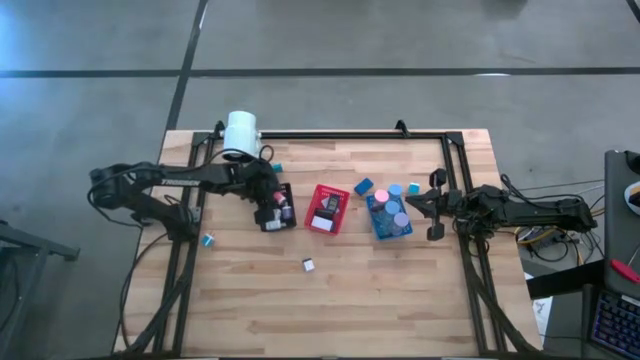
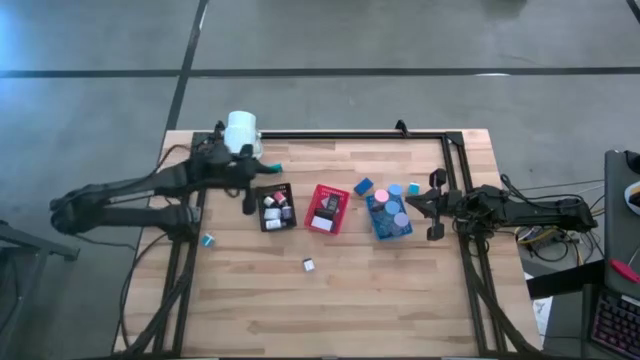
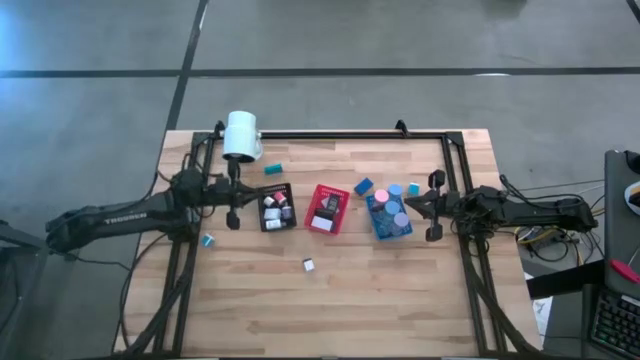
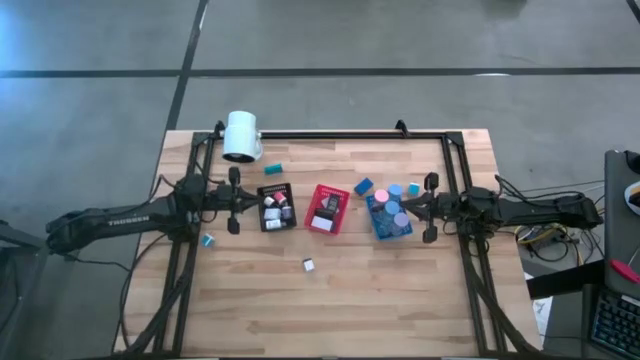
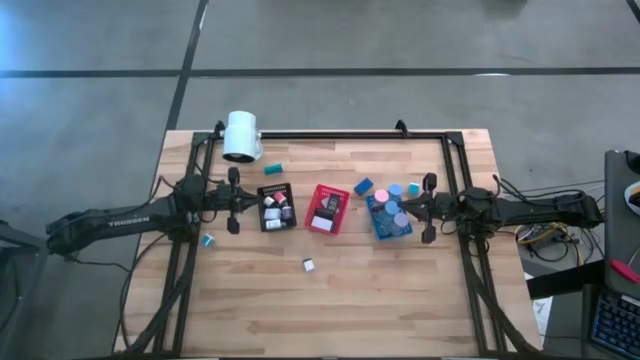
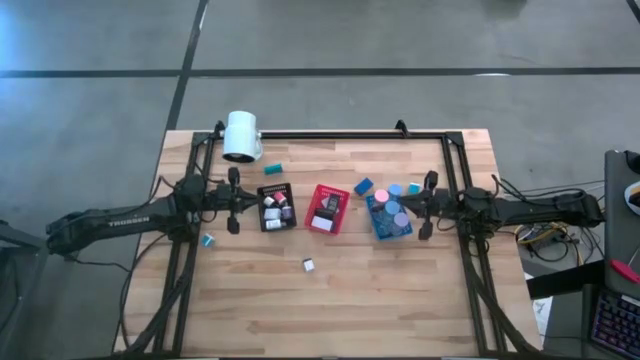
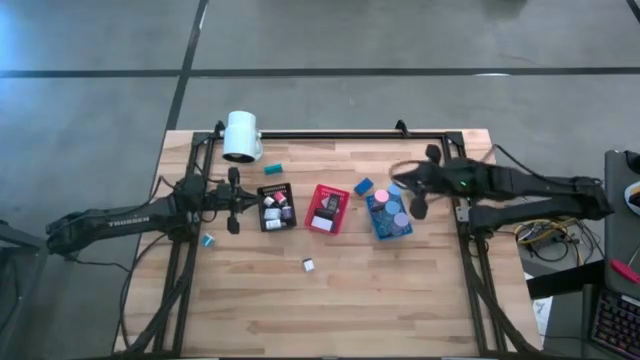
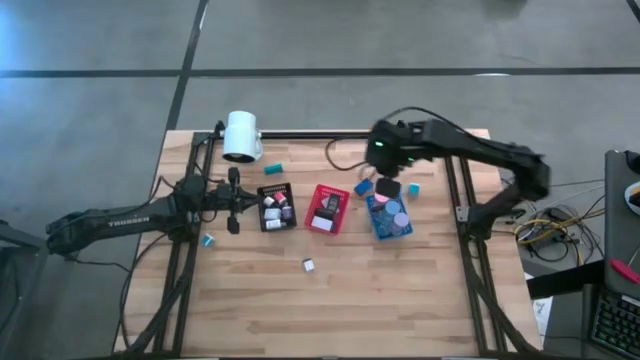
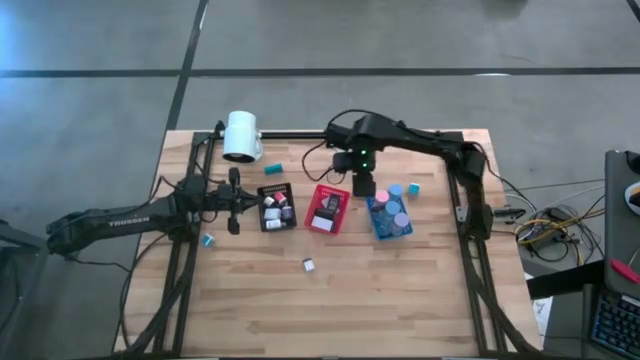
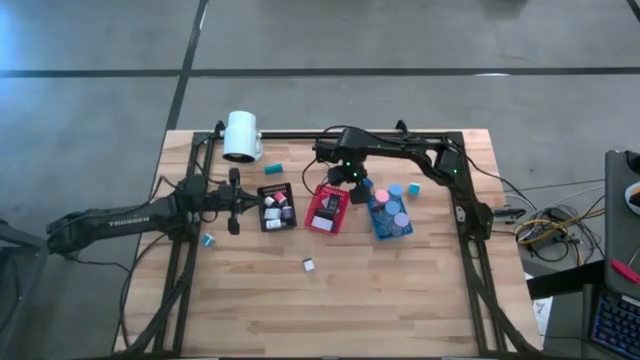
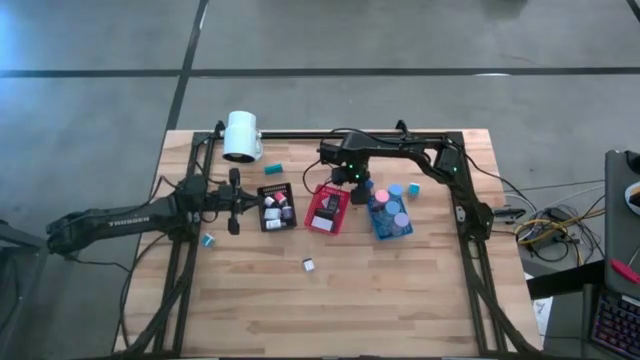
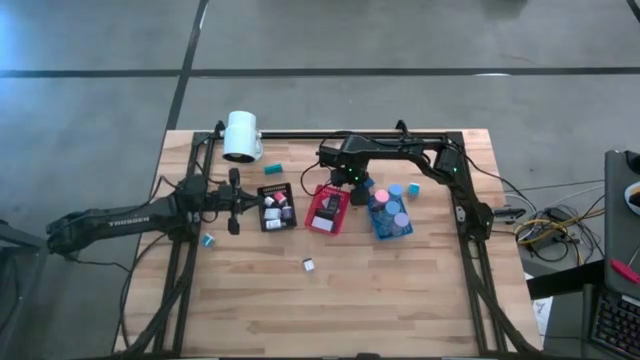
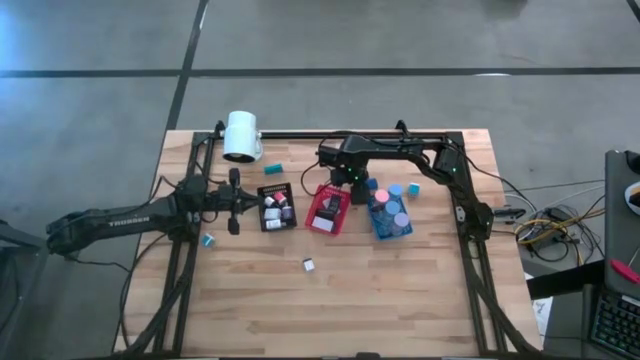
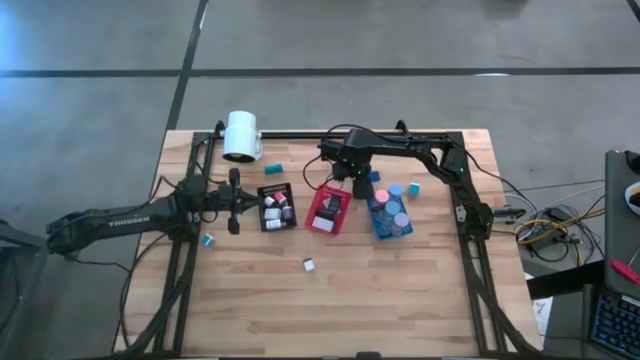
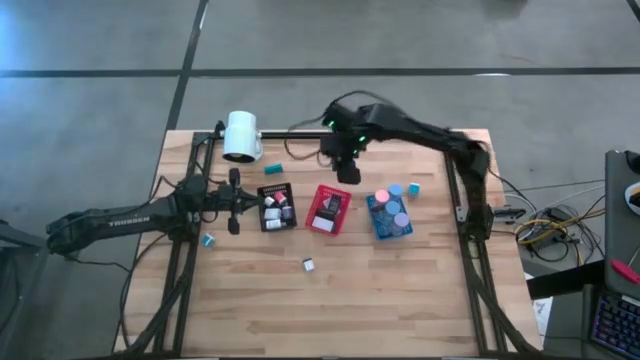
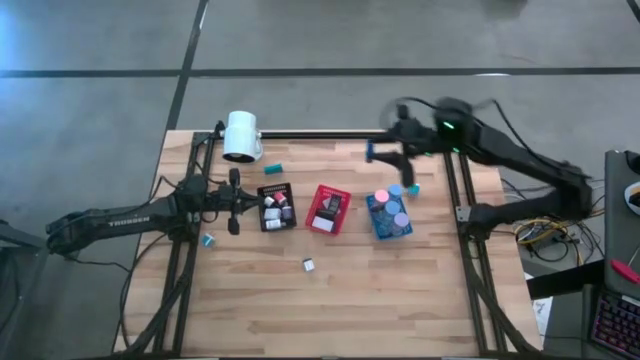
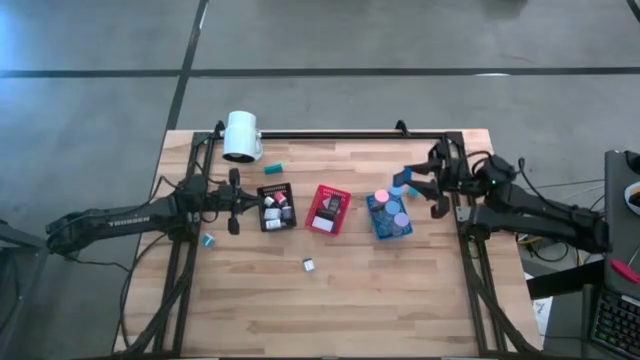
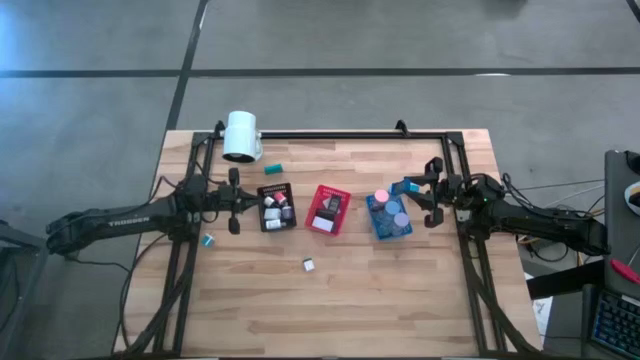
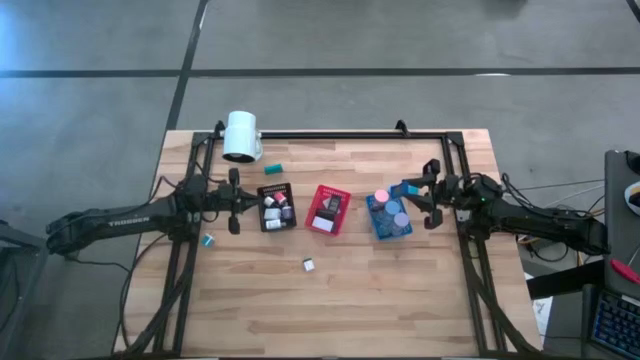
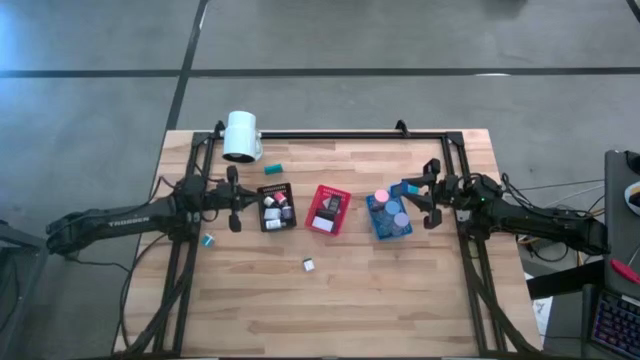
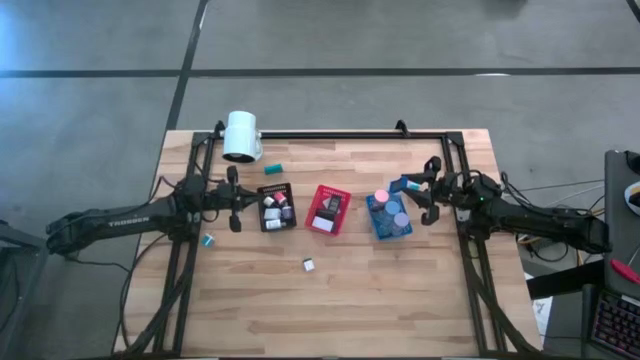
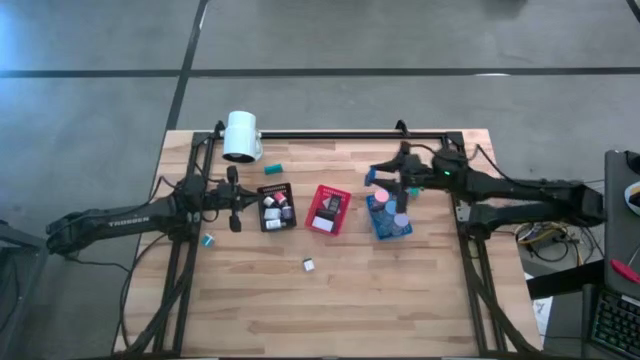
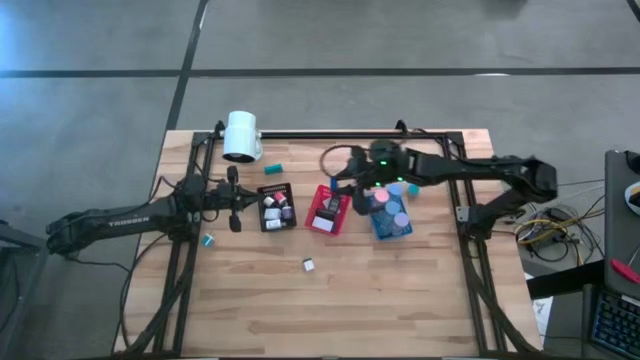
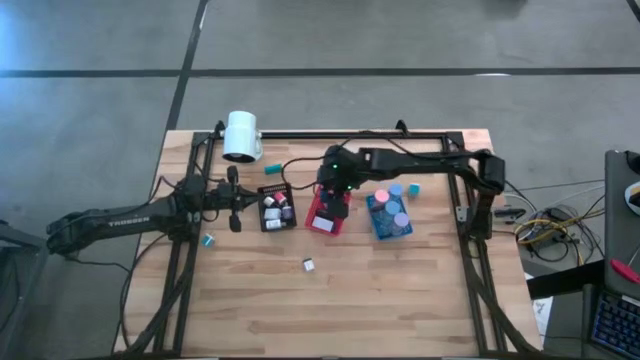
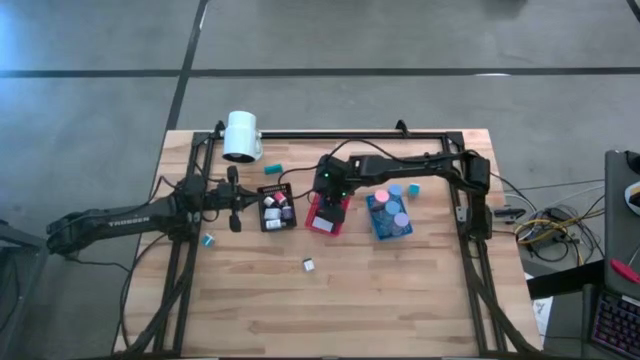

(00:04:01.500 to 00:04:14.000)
Task: Pick & Place Office items
Put the blue digital clock into the red bin

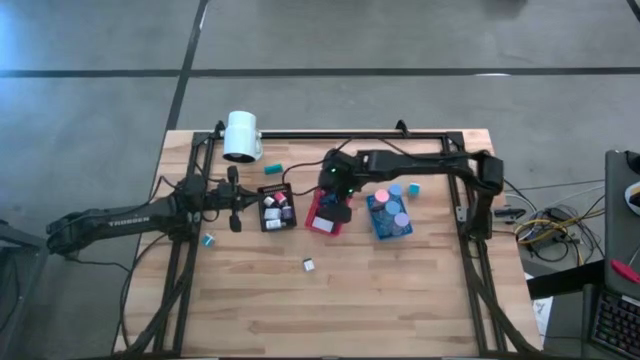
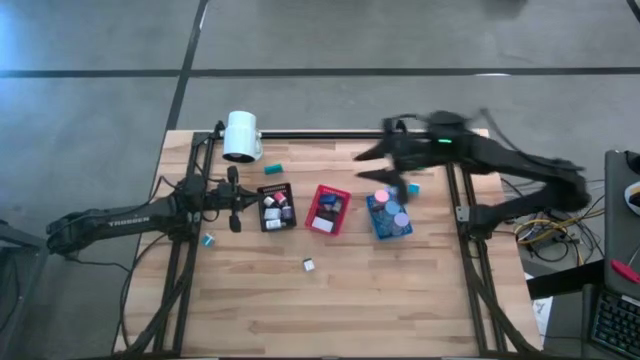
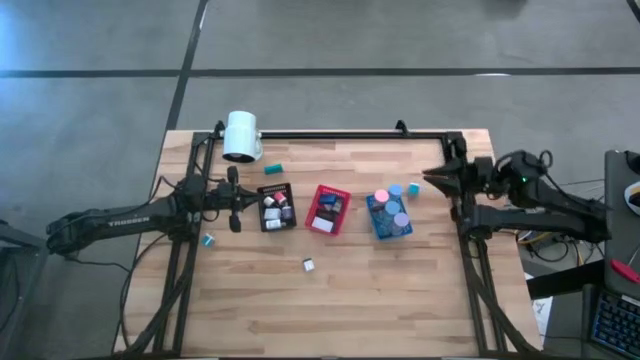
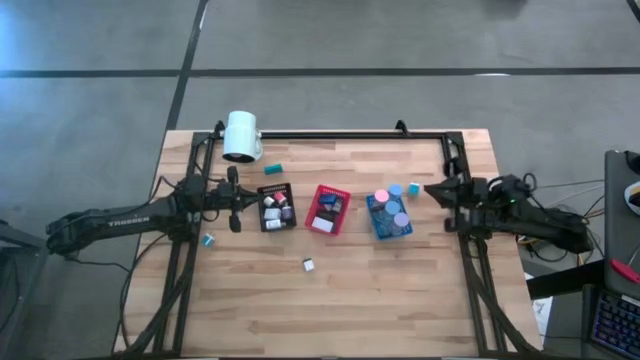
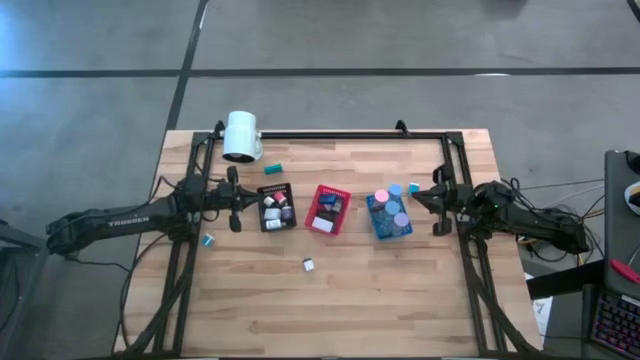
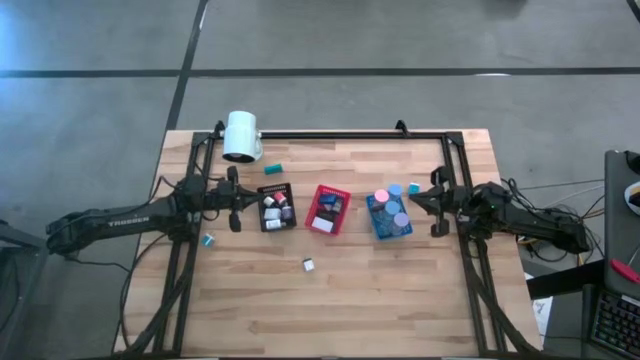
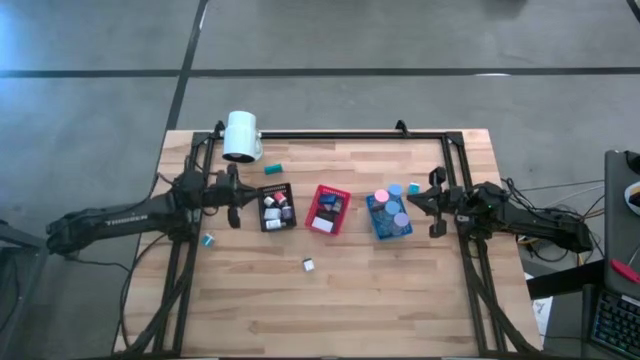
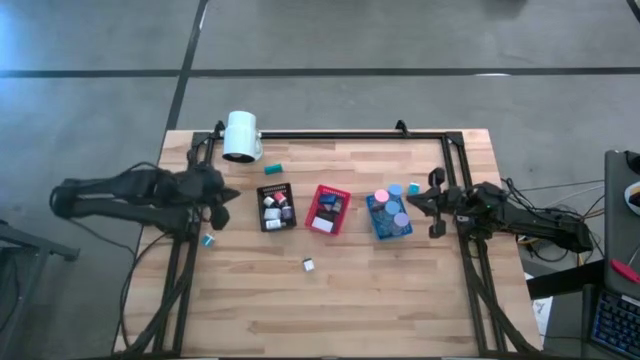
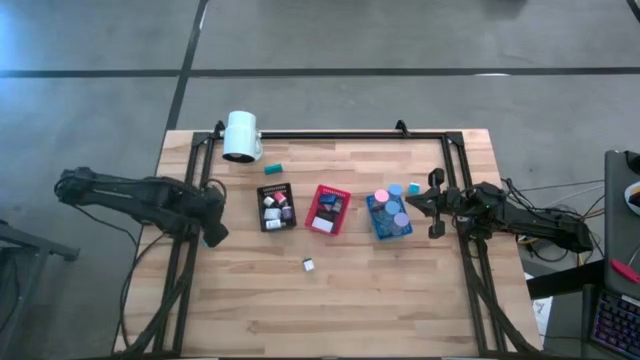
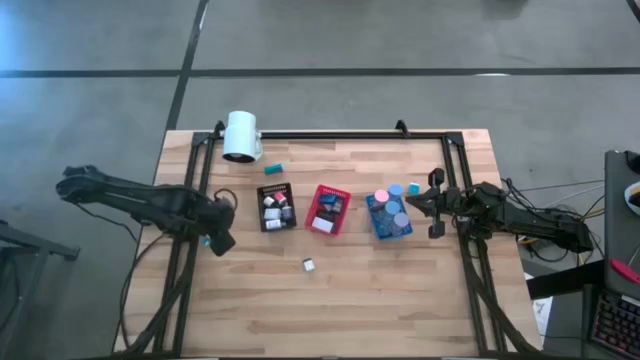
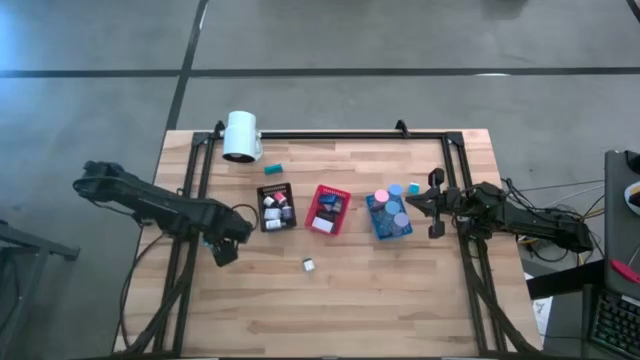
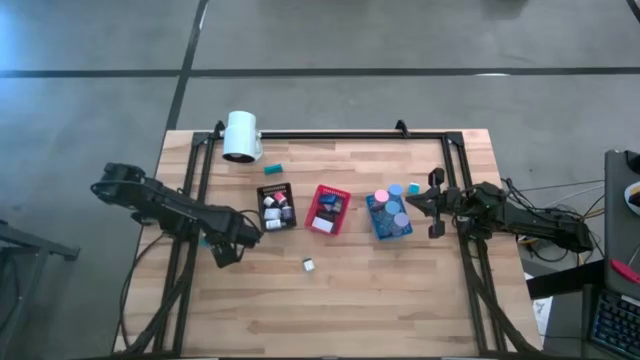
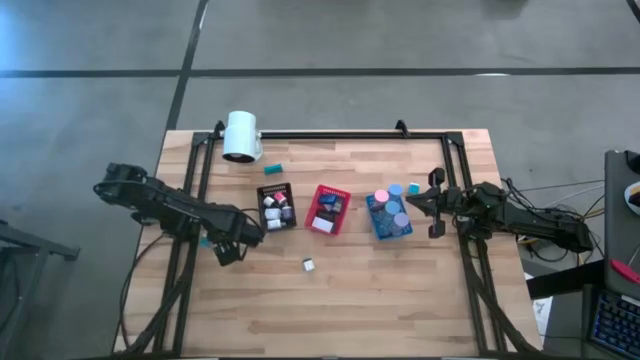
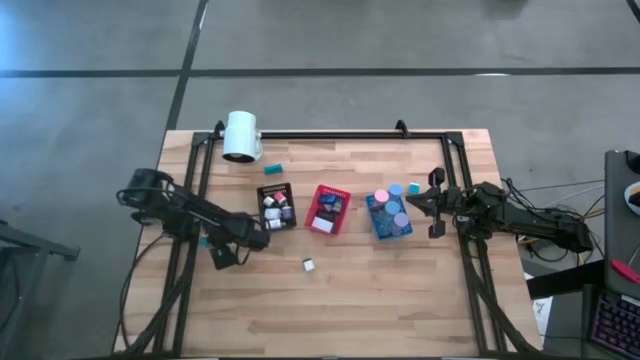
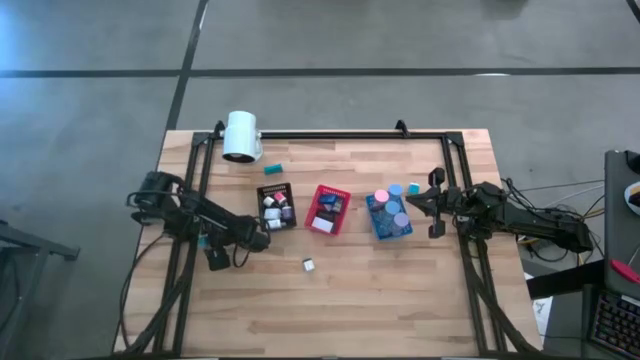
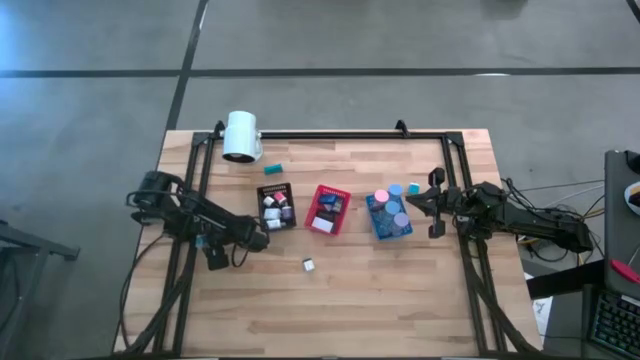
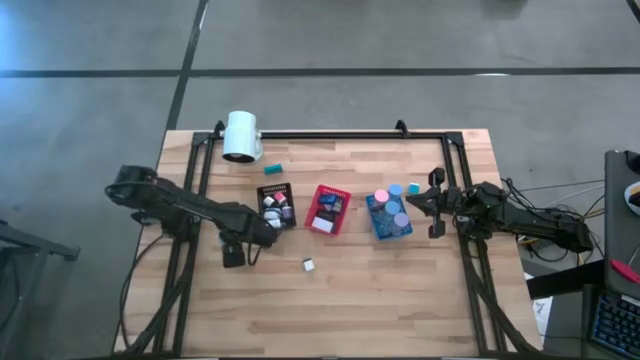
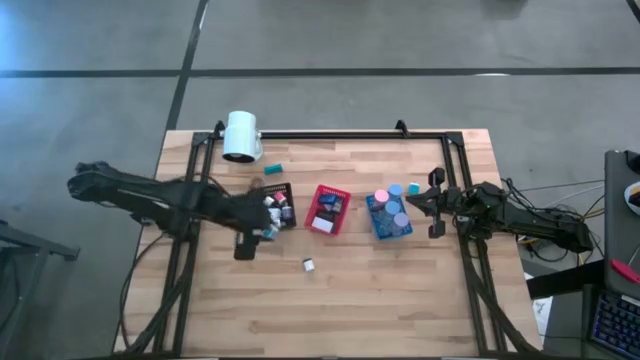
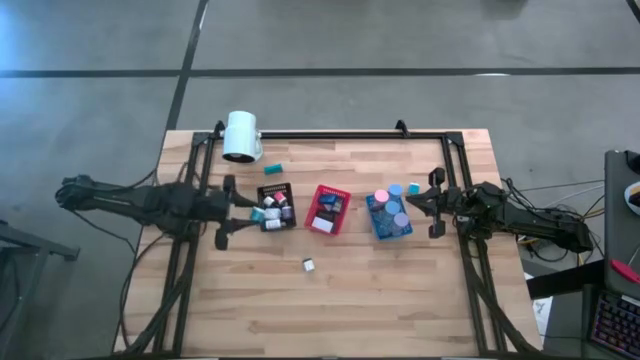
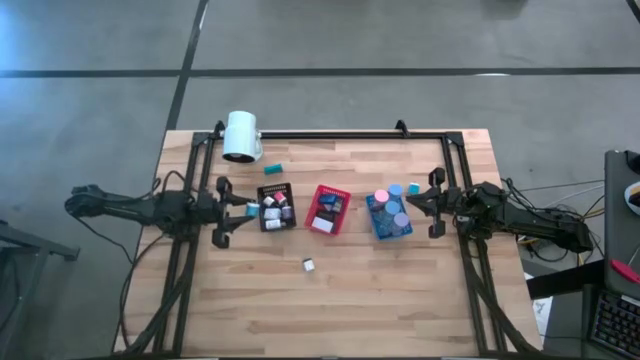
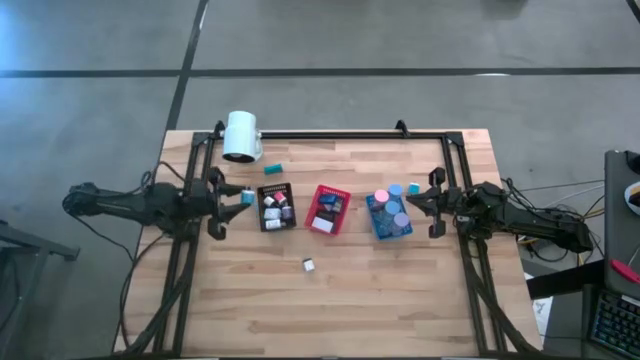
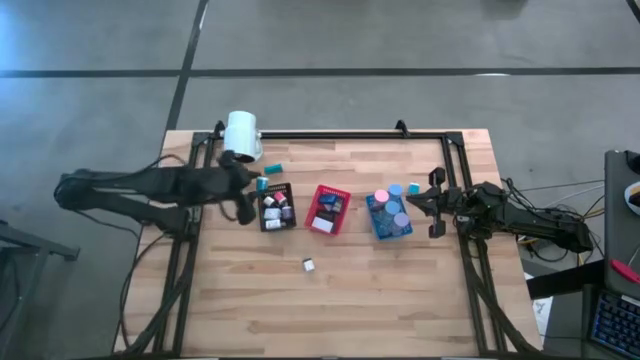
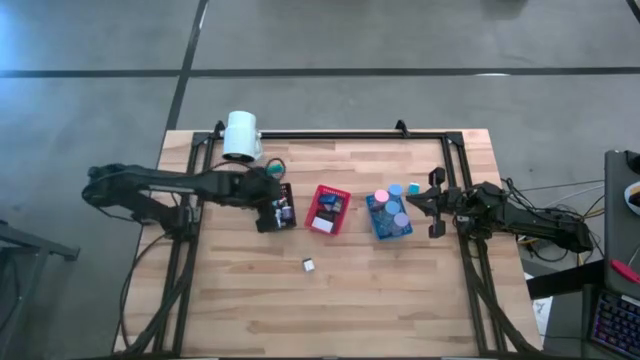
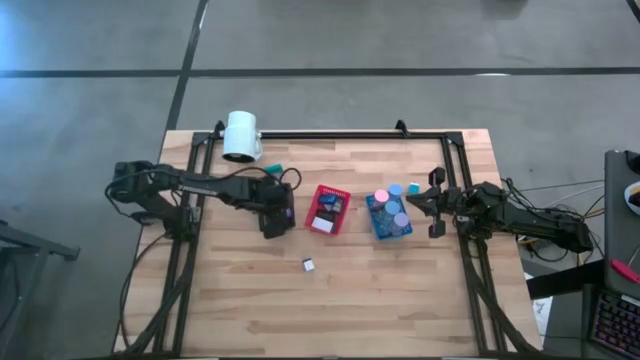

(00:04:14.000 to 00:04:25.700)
Put the left blue charger adapter into the black bin
